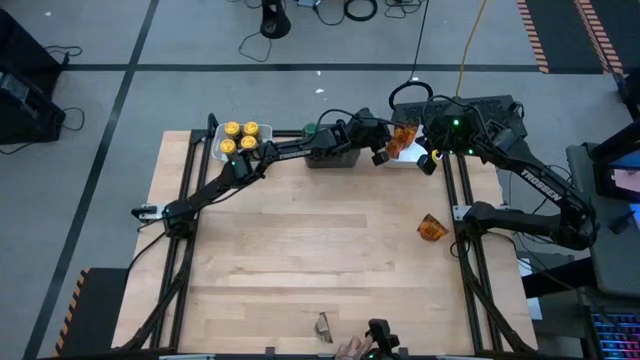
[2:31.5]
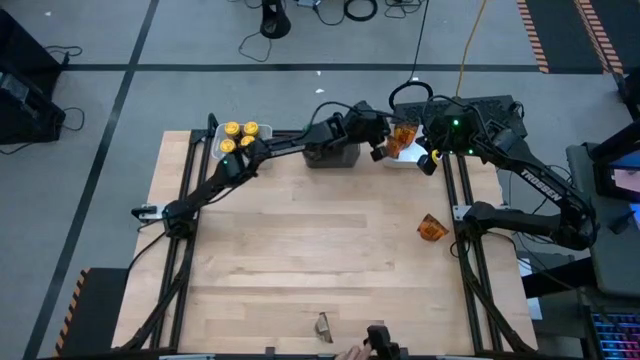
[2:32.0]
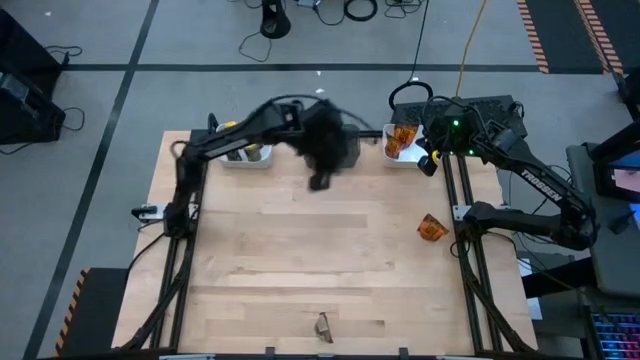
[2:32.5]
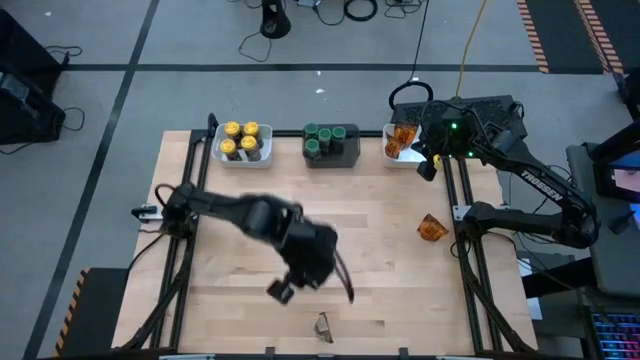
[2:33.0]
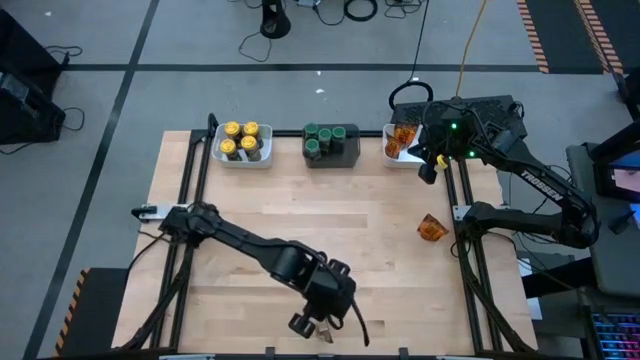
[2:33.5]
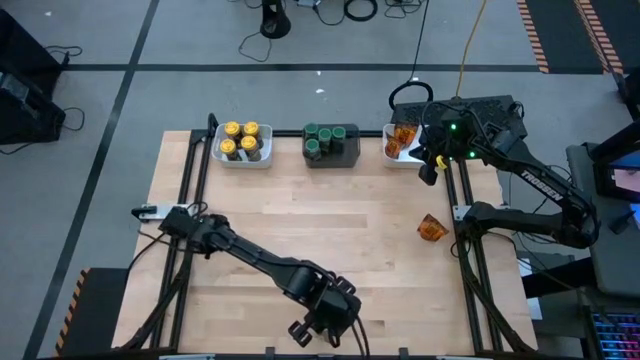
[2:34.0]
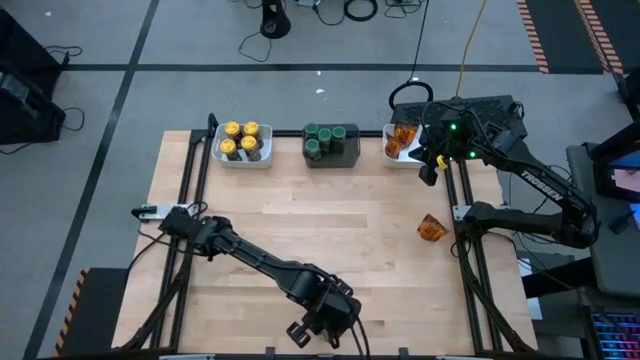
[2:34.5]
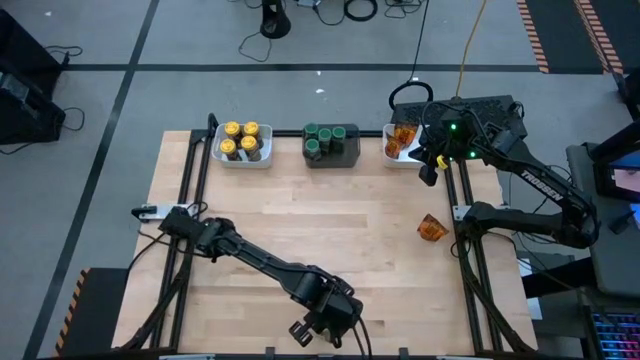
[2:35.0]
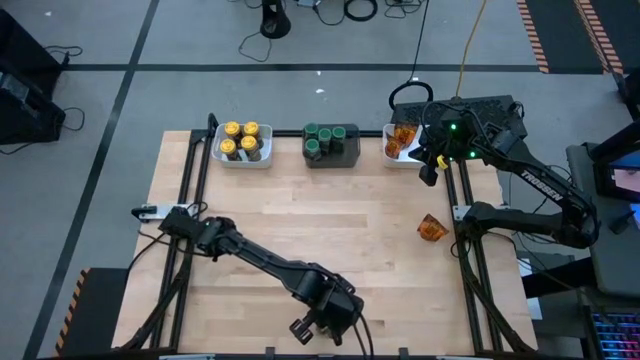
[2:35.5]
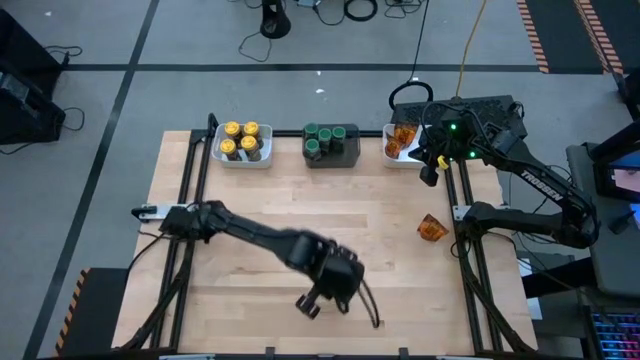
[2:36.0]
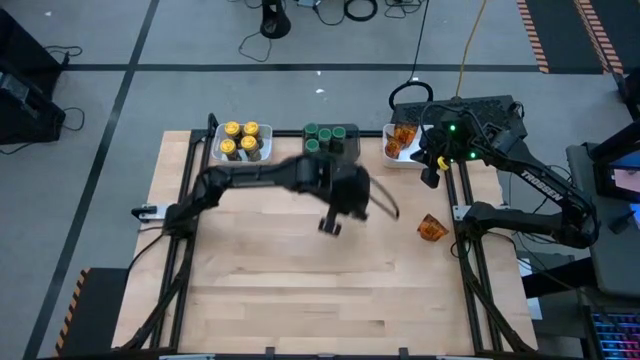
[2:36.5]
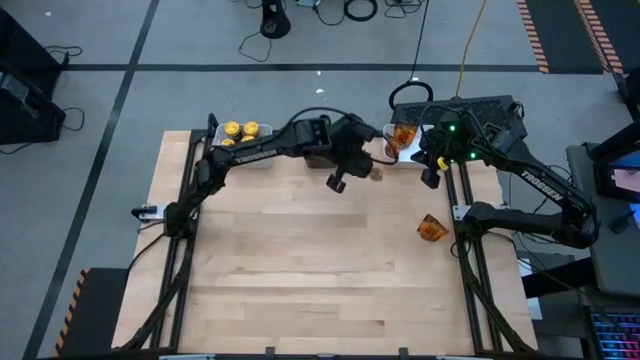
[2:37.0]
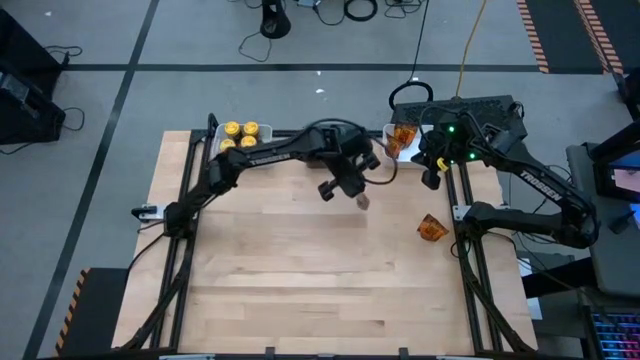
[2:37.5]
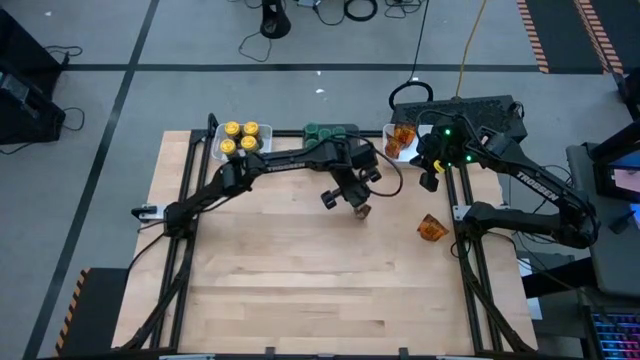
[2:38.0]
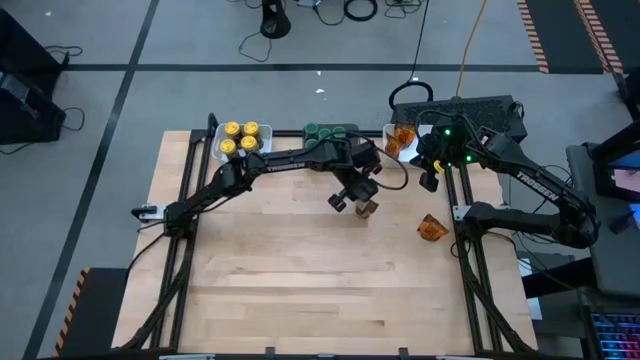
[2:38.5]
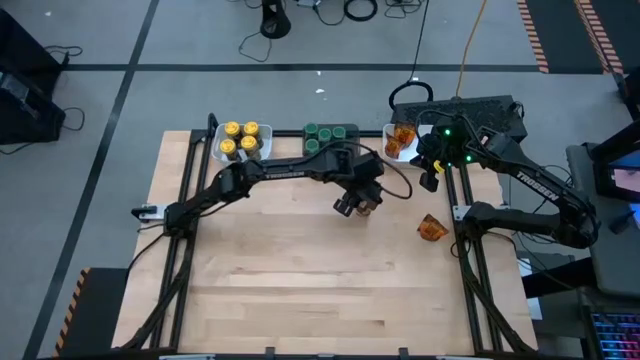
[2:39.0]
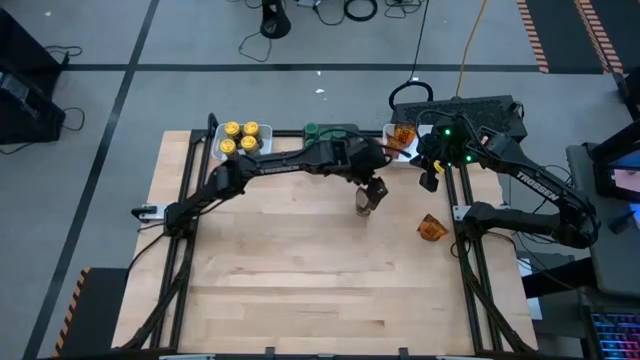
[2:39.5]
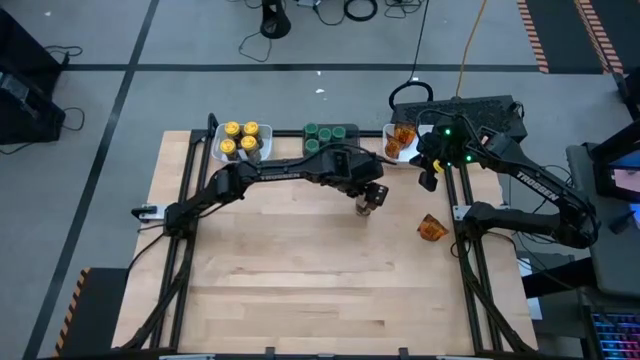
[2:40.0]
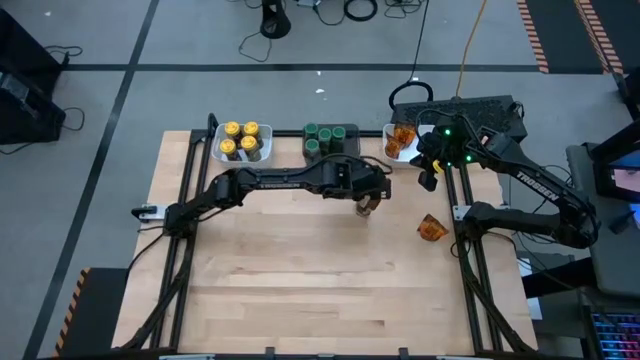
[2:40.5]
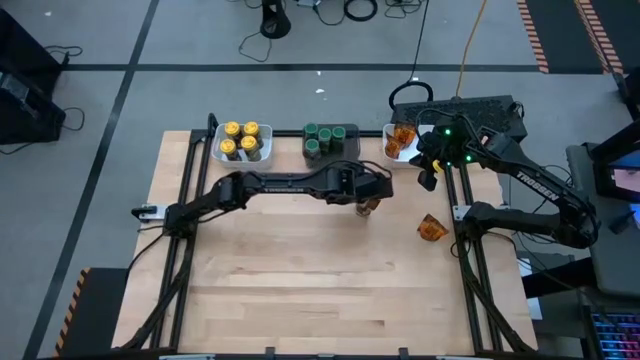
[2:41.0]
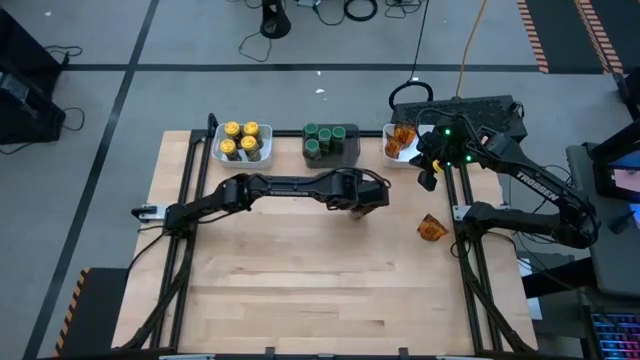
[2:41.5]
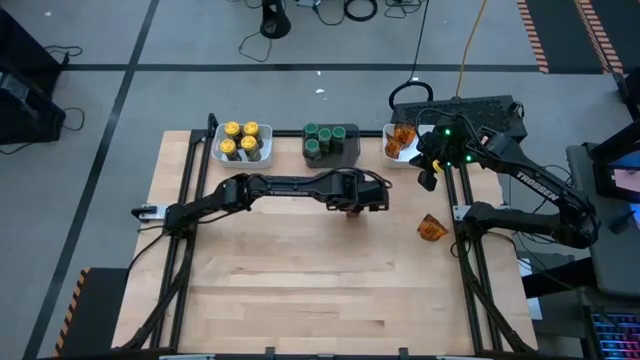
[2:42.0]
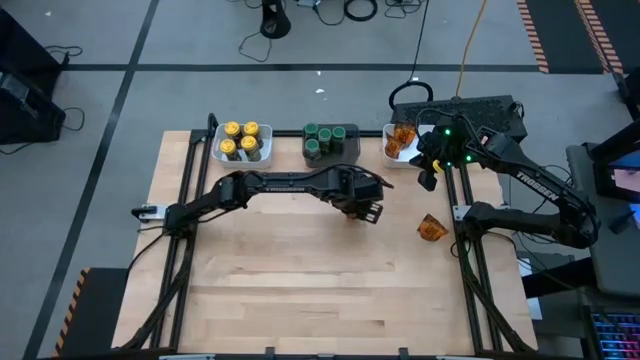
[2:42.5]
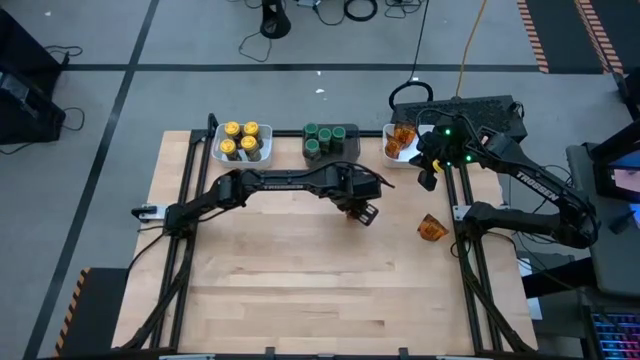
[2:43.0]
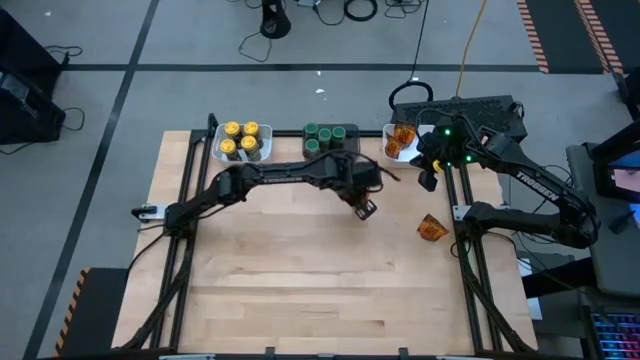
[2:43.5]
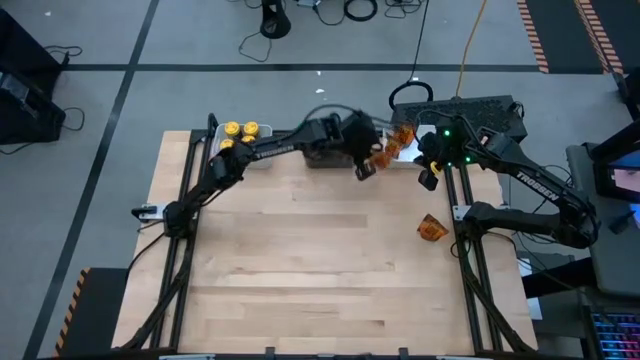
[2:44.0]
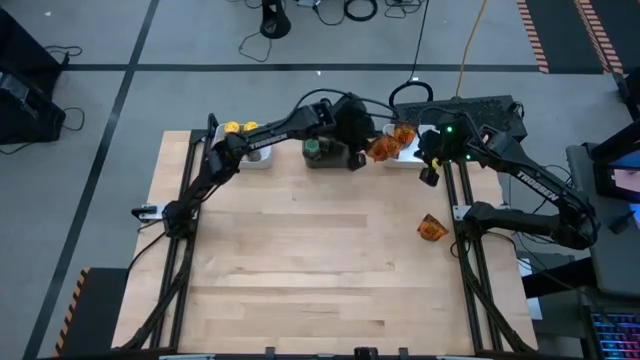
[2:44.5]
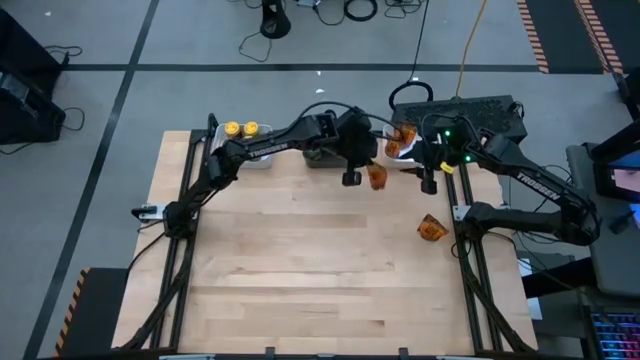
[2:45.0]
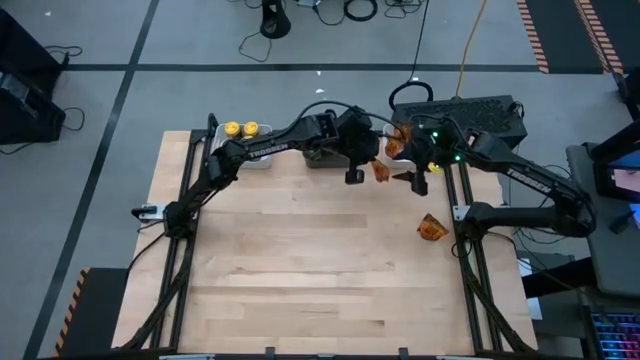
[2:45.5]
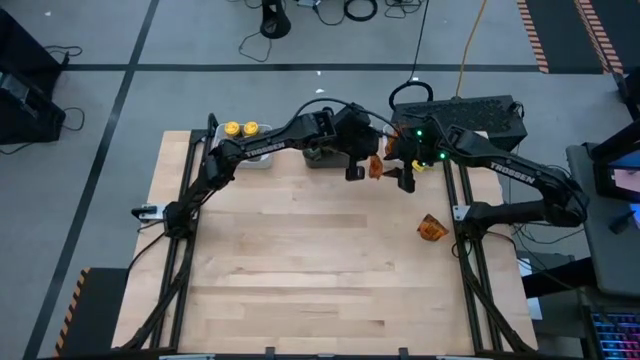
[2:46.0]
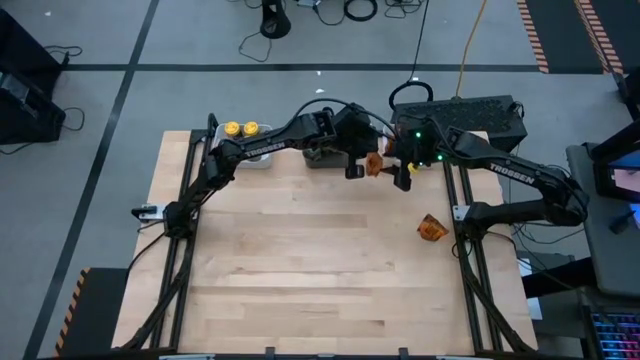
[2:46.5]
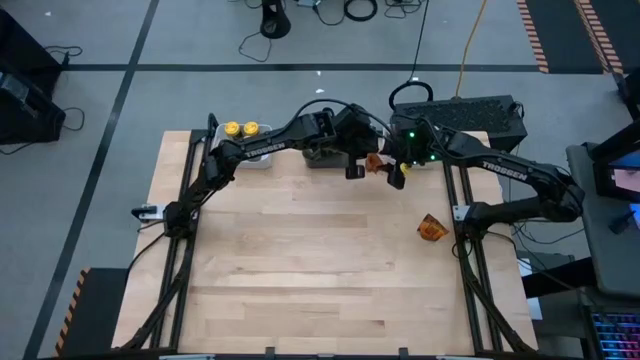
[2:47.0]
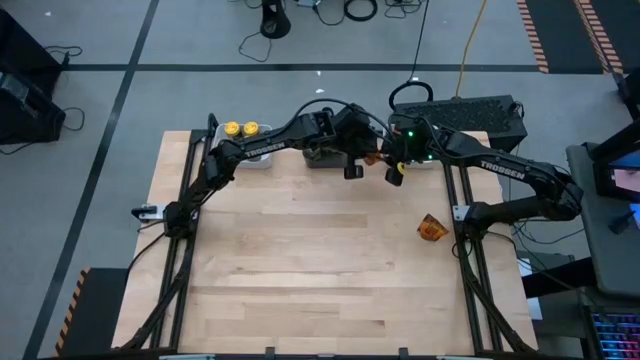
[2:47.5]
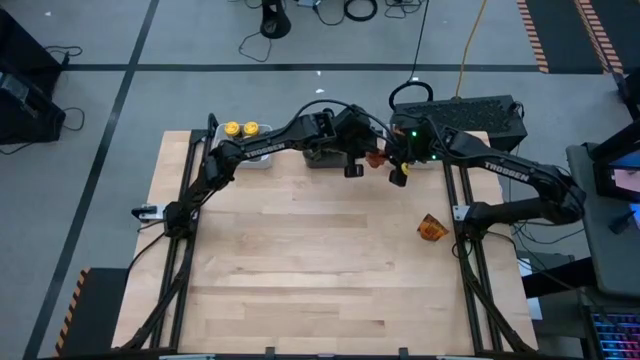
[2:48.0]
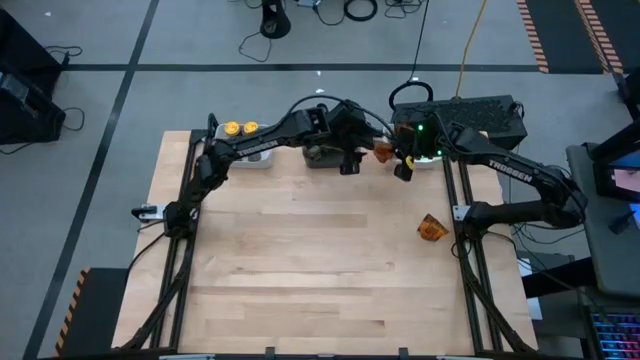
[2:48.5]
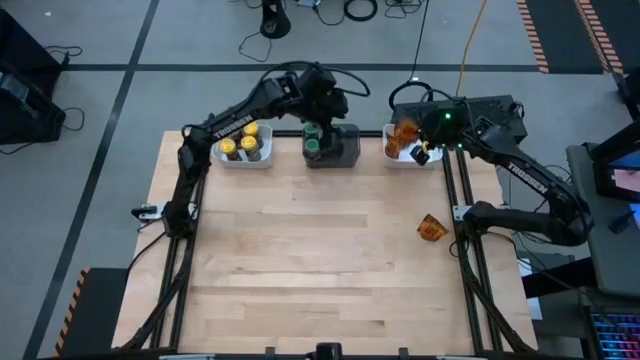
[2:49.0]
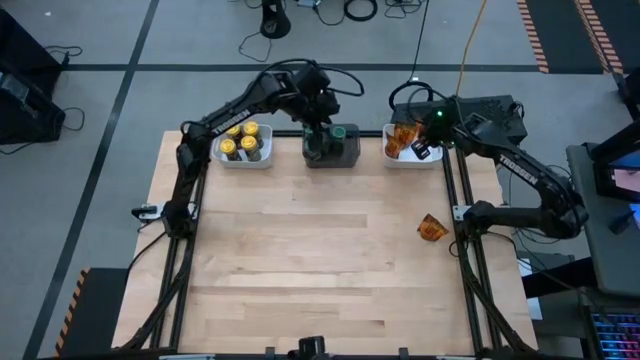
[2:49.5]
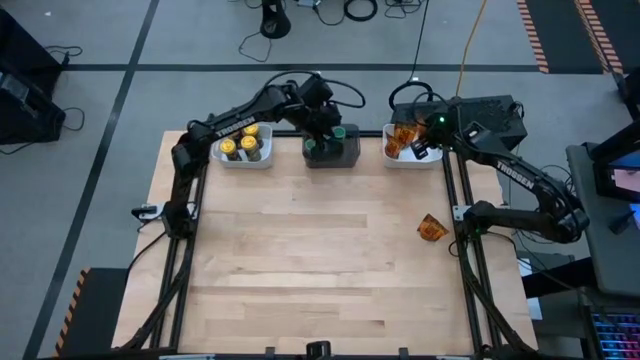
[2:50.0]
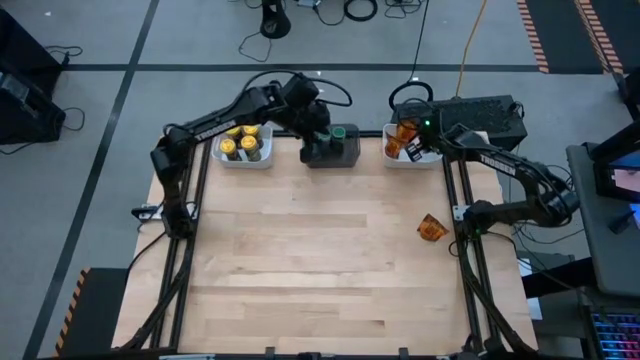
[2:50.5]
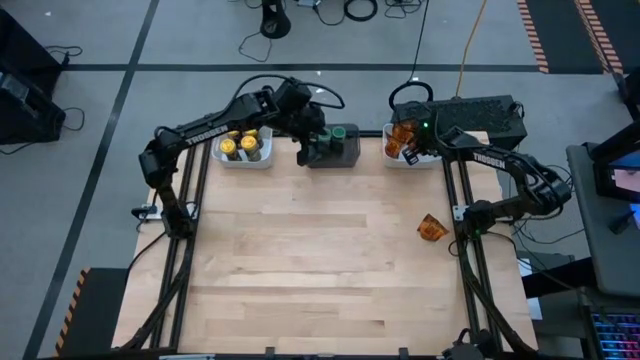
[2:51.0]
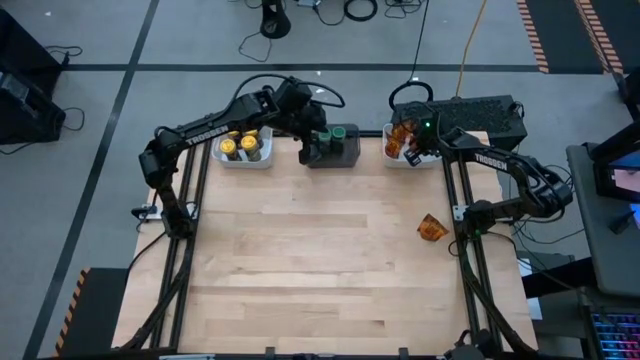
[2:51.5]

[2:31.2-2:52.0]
Task: Sort spices by type
Put the bottom orange seasoning pack into the right white bin

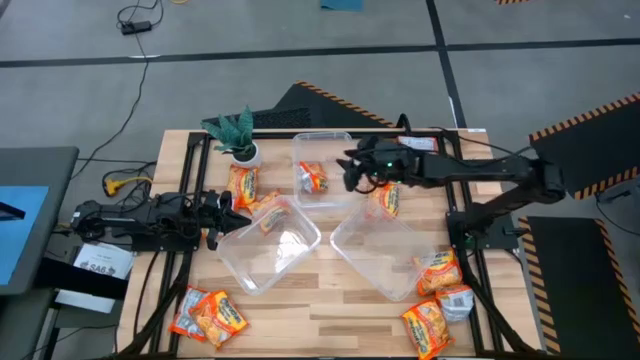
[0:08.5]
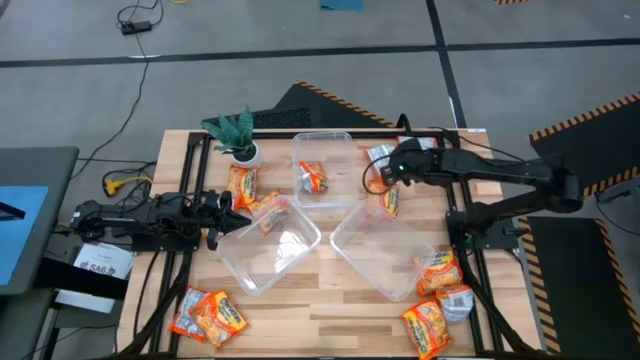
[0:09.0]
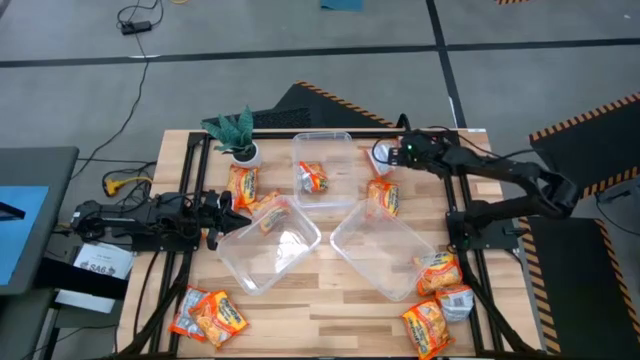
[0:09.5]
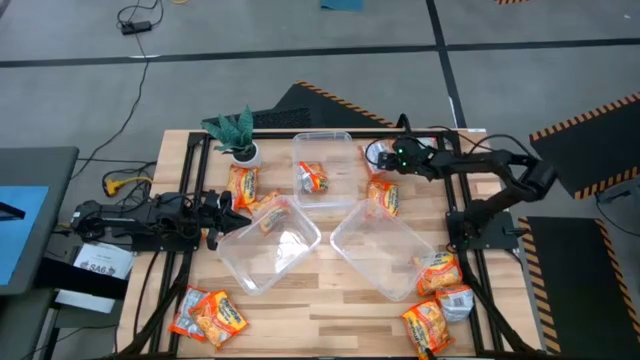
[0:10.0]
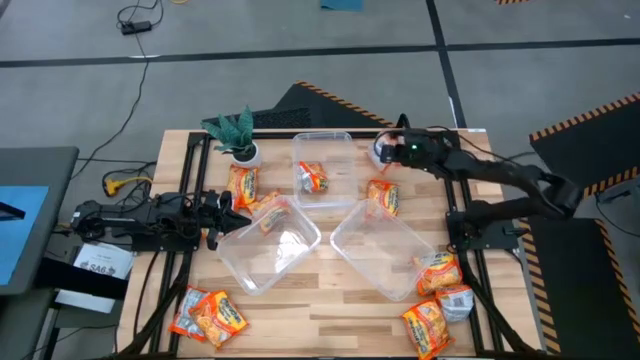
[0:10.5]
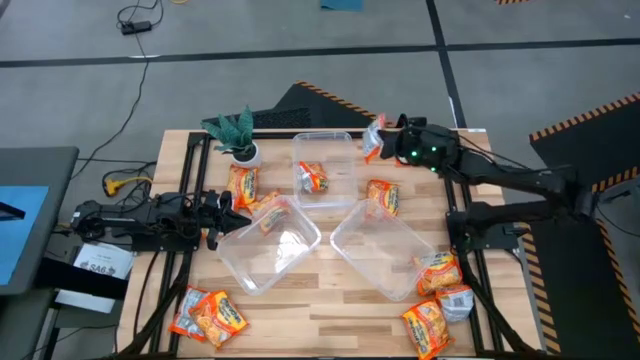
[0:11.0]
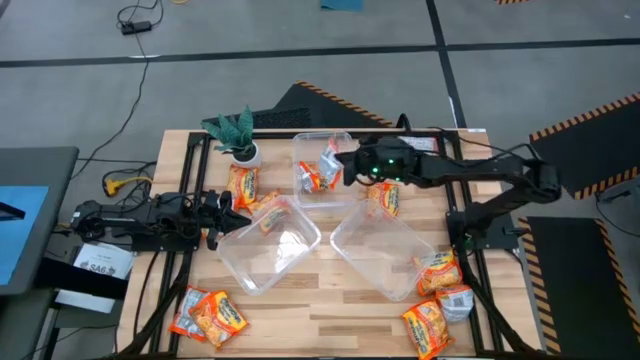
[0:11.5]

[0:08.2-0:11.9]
Task: Sort Maruchan noodles
Put the orange noodle pack into the top transparent container
